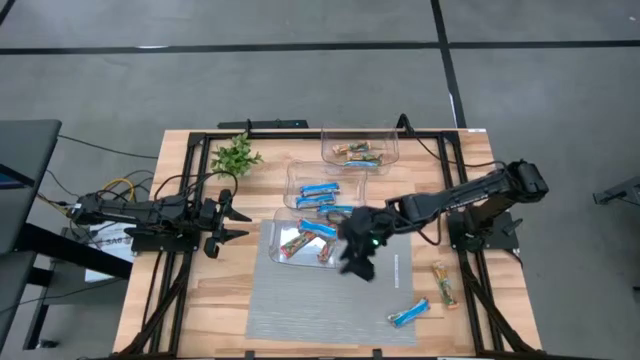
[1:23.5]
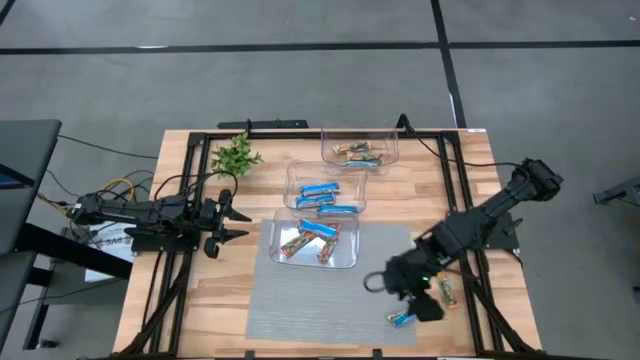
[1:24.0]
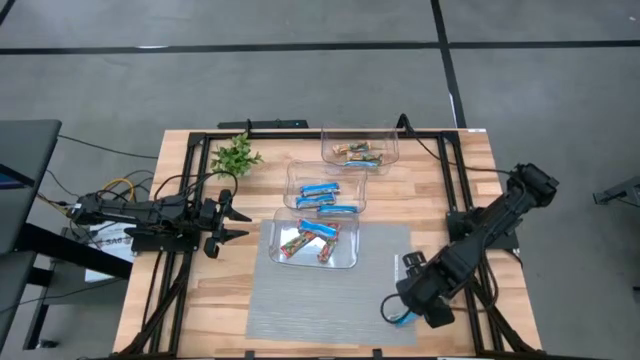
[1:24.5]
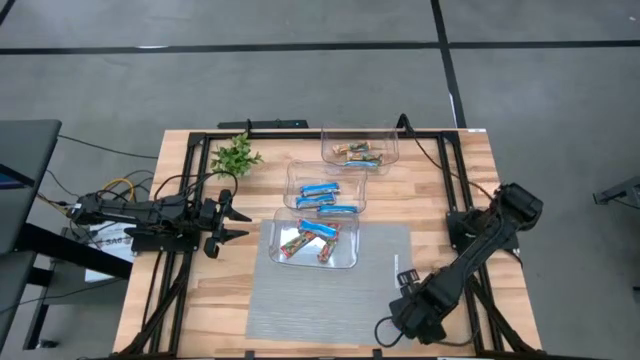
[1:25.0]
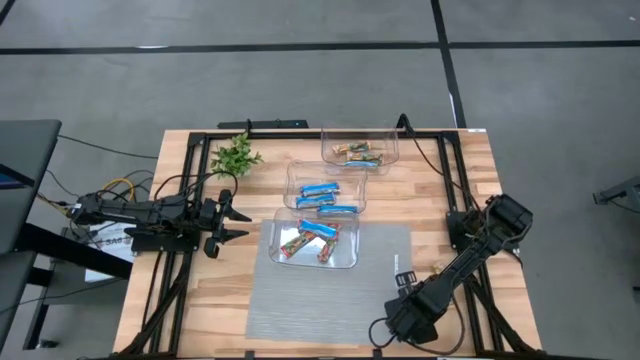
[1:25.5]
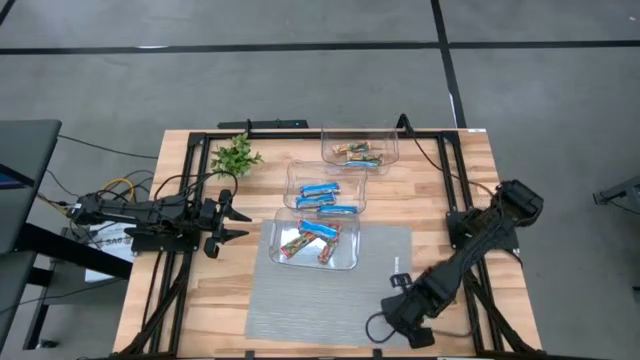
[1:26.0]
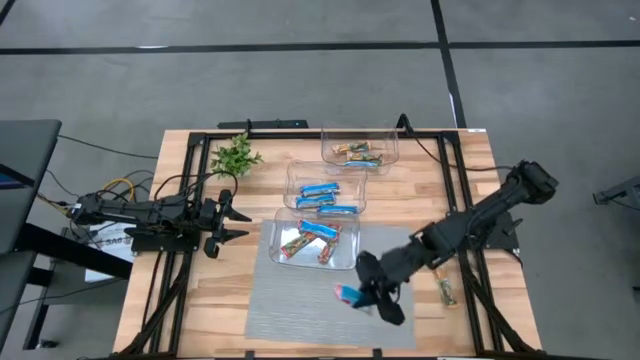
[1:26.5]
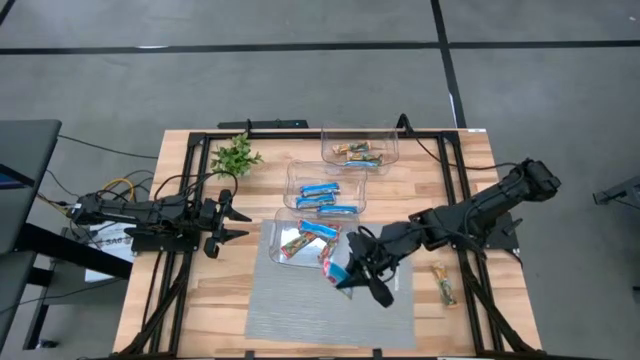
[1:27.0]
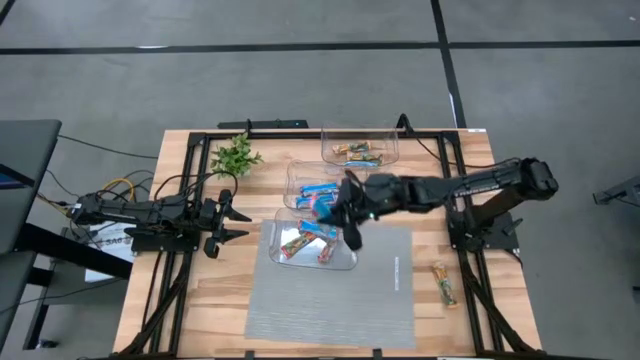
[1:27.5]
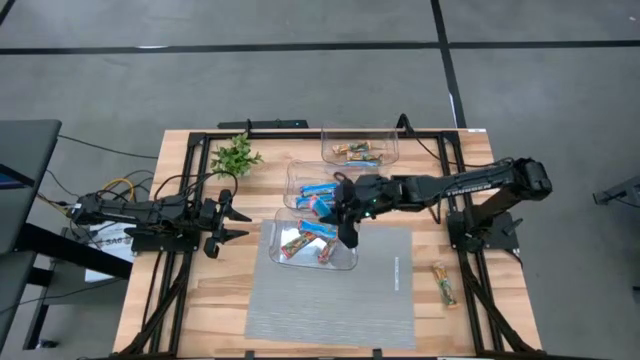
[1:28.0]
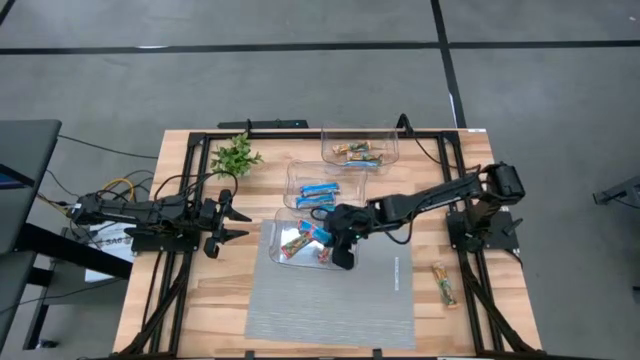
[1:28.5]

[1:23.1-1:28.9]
Task: Pick and place Granola Bars by type
Put the red granola bar into the bottom transparent bin

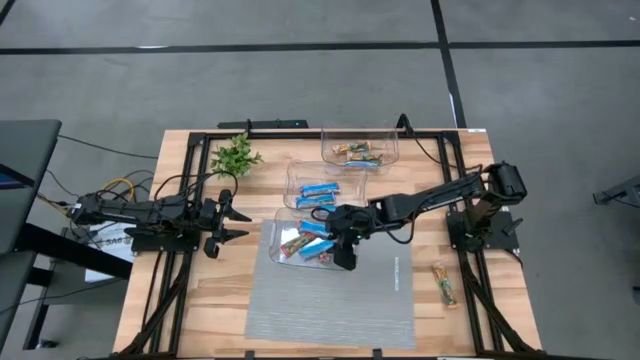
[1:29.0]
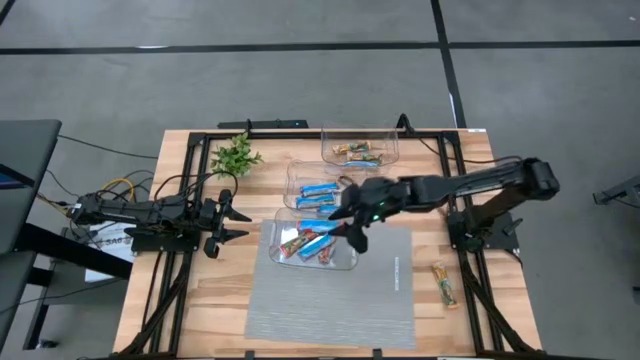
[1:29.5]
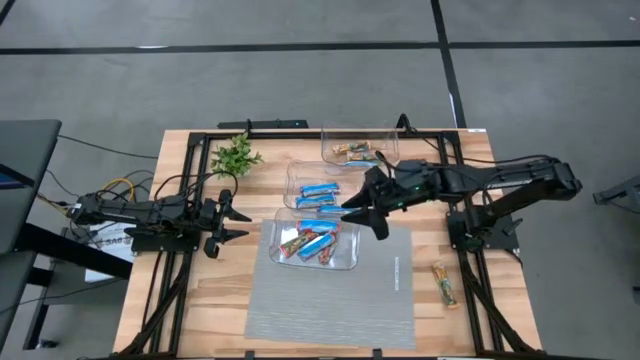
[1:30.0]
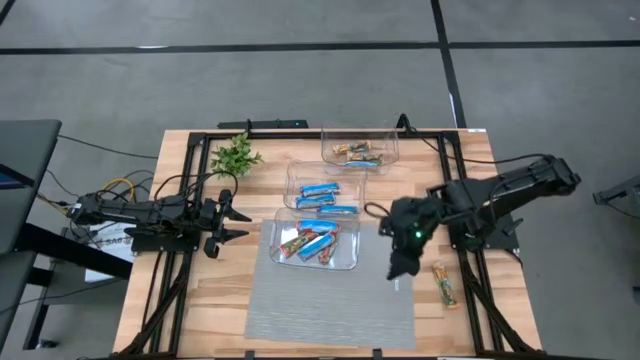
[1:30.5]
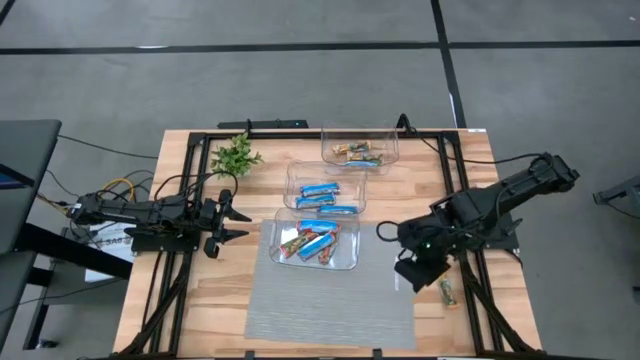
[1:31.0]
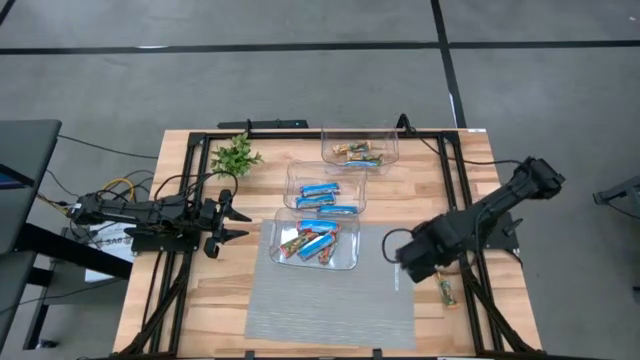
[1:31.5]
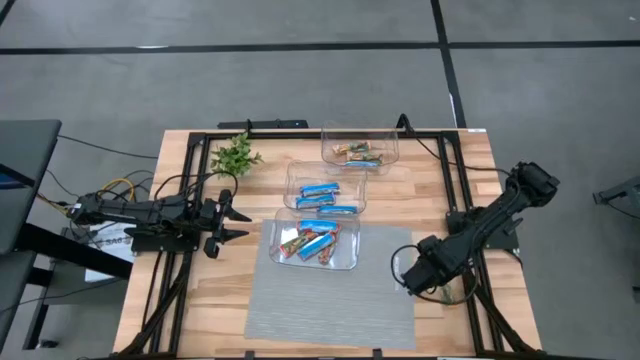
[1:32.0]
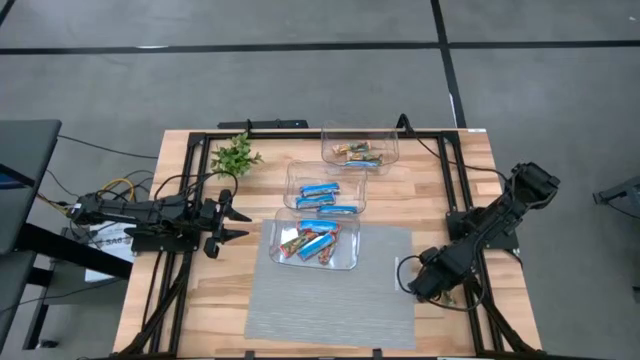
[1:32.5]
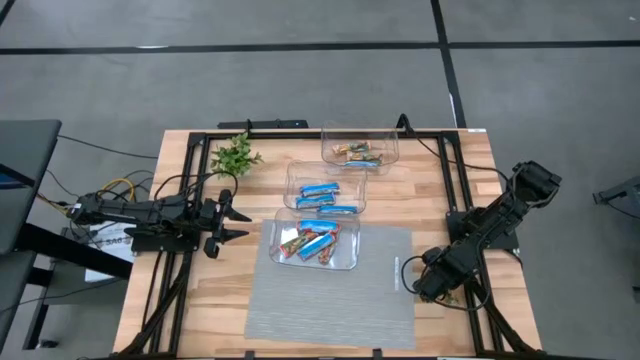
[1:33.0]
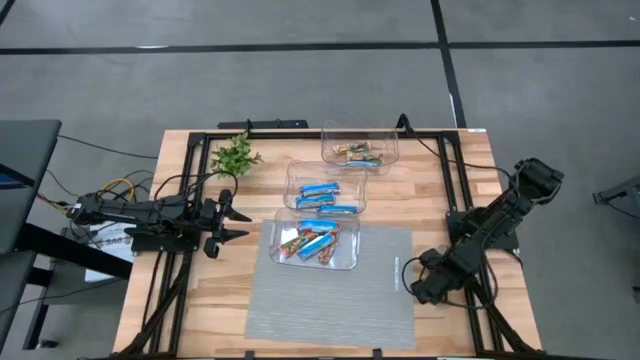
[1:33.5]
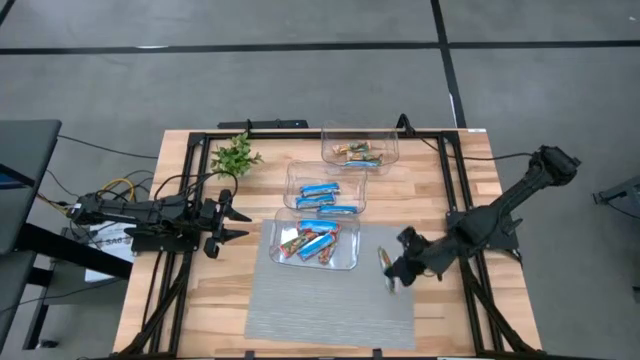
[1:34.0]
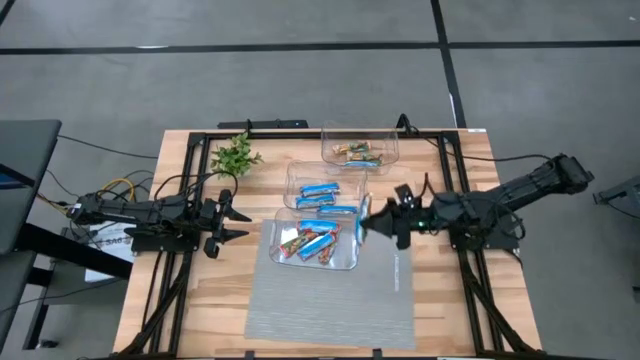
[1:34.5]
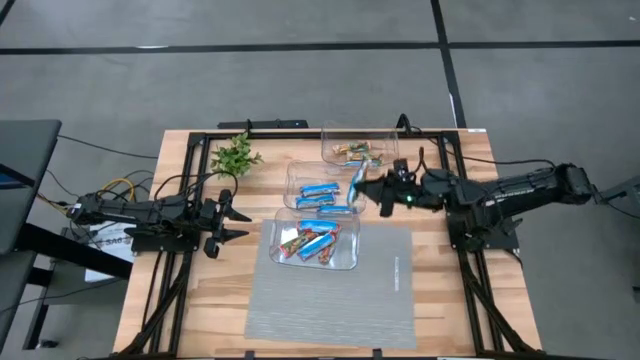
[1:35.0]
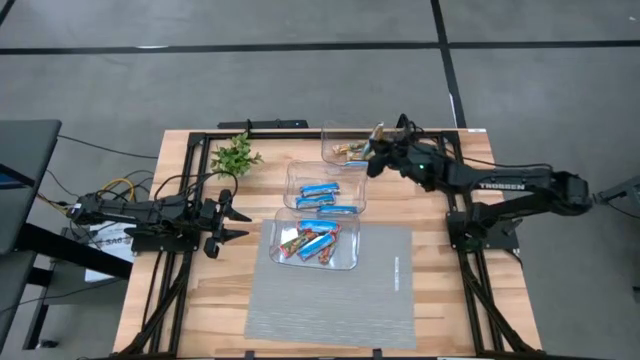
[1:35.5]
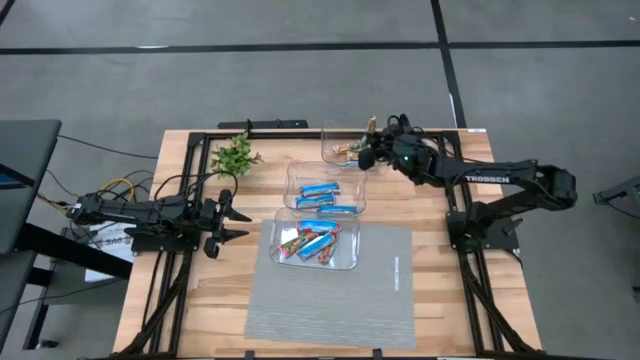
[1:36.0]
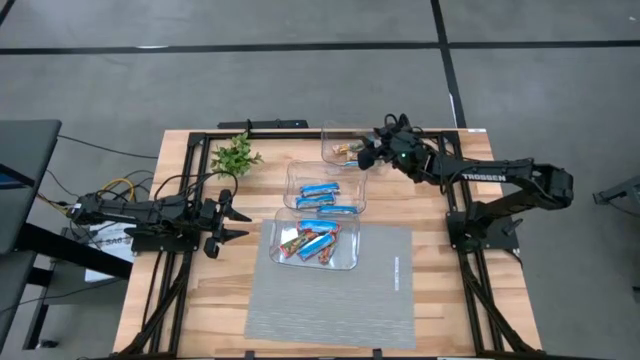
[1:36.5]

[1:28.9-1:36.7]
Put the yellow granola bar into the top transparent bin

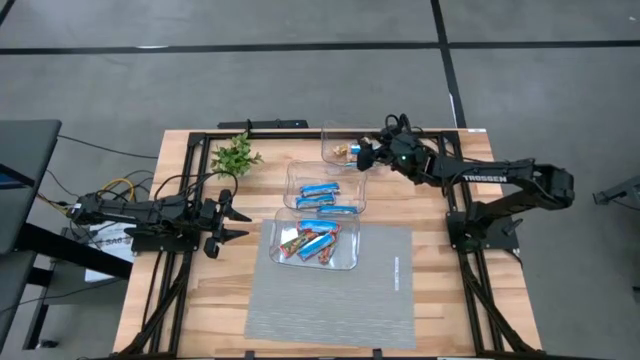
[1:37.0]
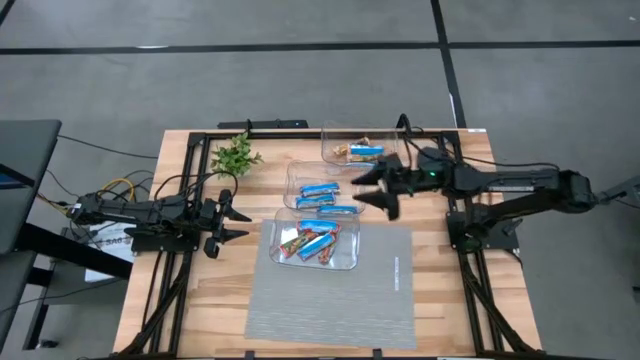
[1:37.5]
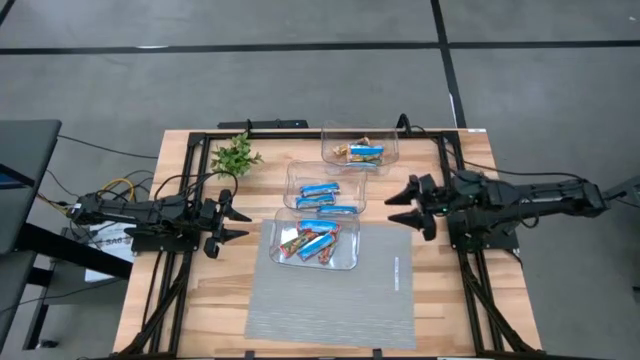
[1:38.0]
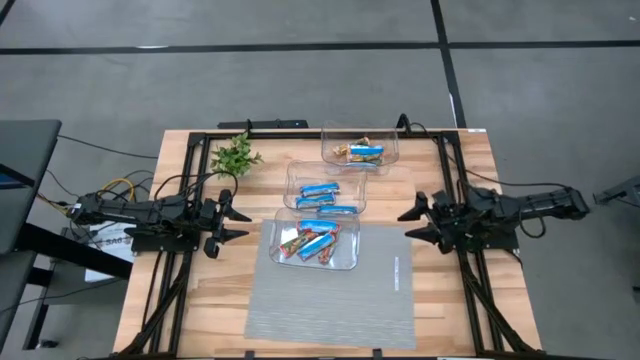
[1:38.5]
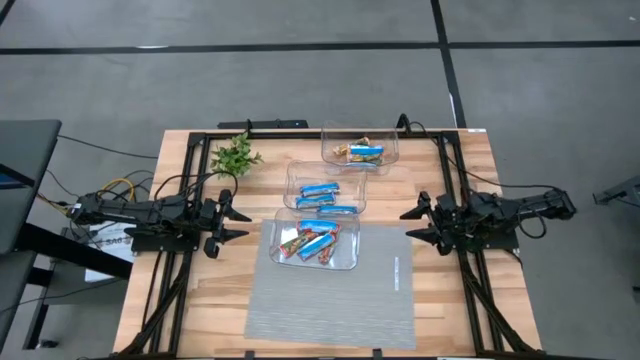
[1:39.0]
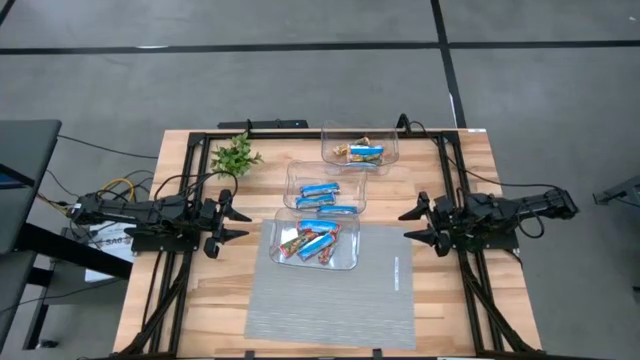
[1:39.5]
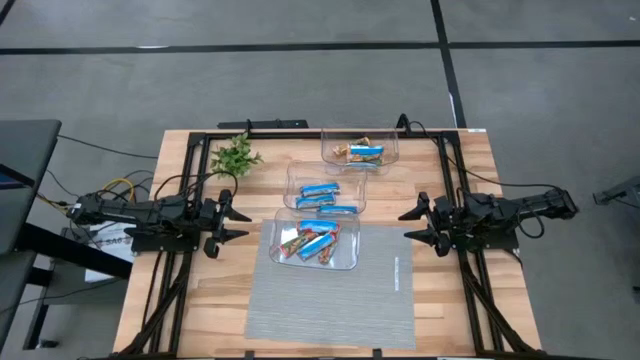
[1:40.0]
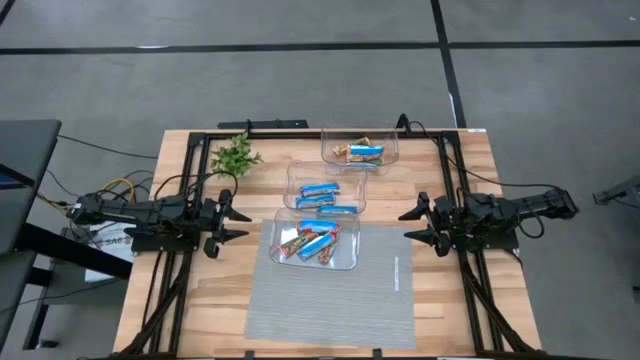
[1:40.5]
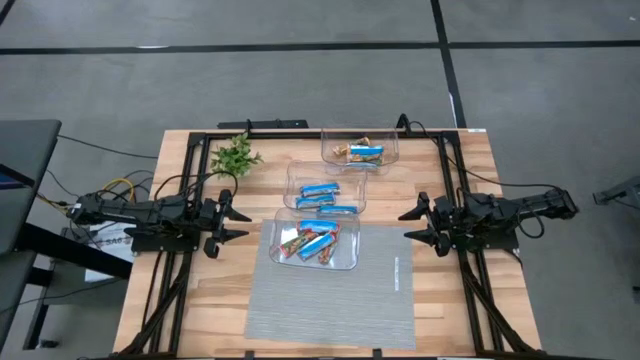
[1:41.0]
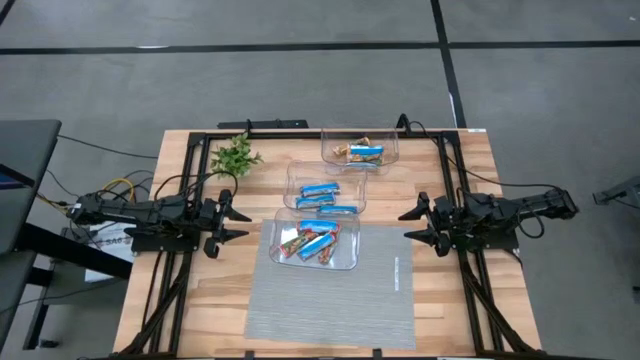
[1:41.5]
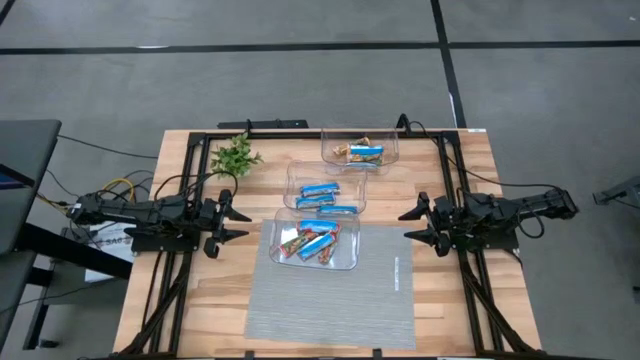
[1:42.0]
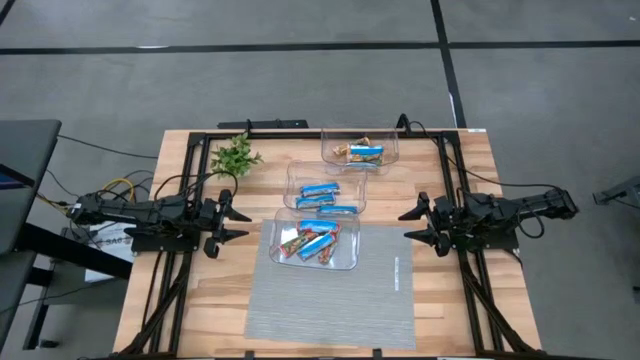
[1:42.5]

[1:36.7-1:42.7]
Return to Home Position

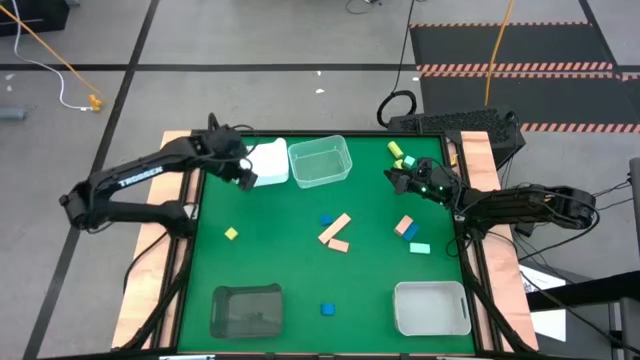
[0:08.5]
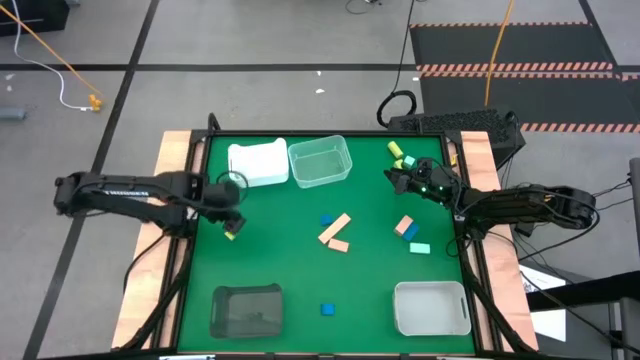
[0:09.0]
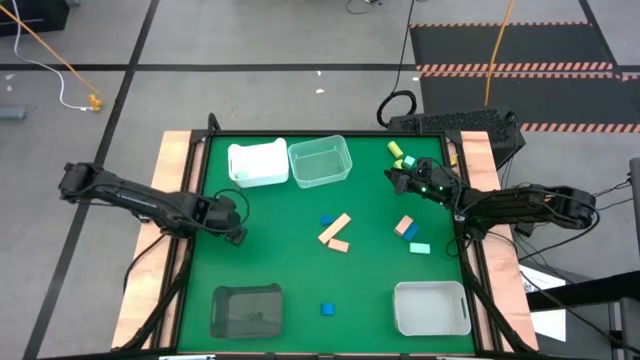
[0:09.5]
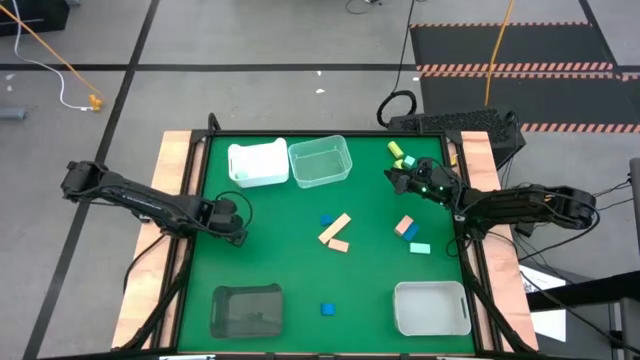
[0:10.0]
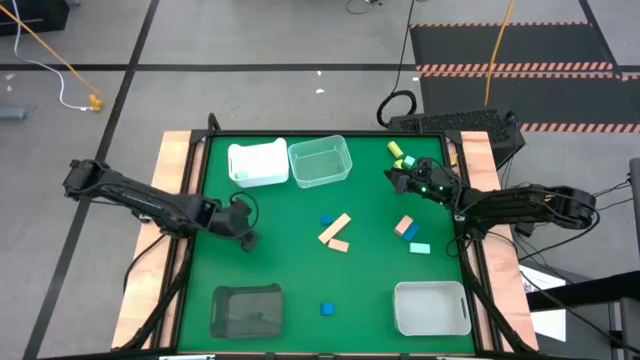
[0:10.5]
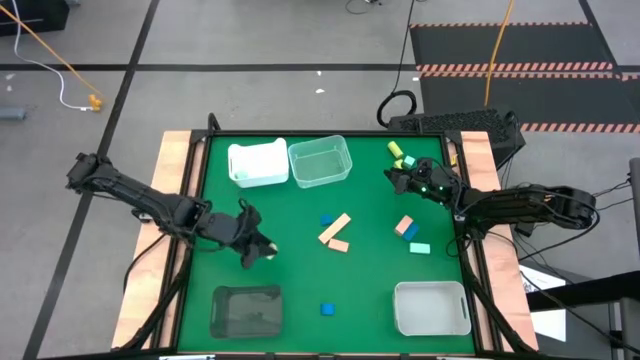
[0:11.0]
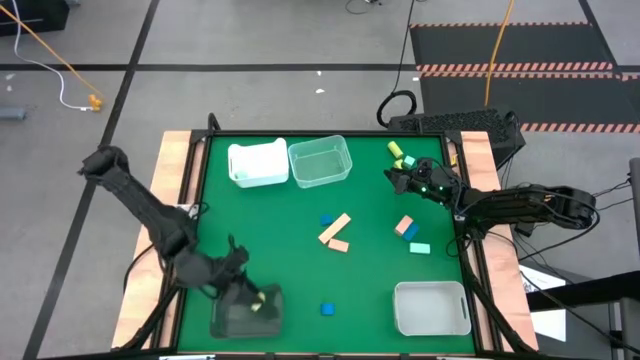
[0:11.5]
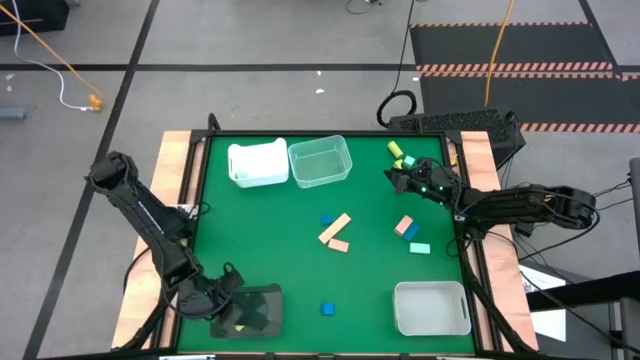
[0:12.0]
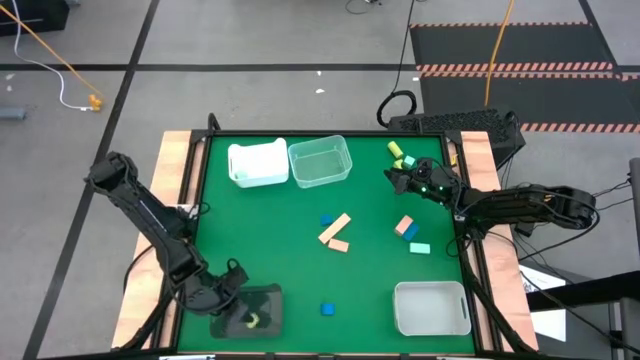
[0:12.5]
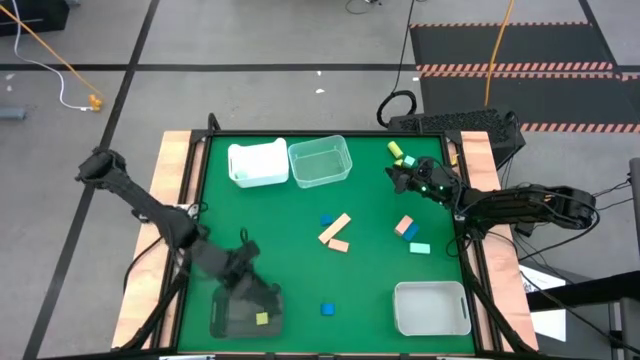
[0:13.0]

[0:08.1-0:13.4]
Task: Sort & place blocks by color
Put the bottom yellow blocks into the black bin
